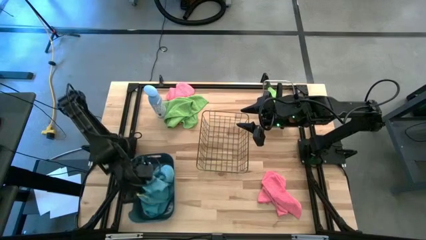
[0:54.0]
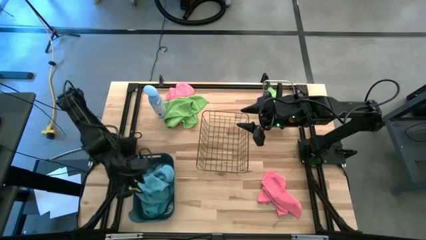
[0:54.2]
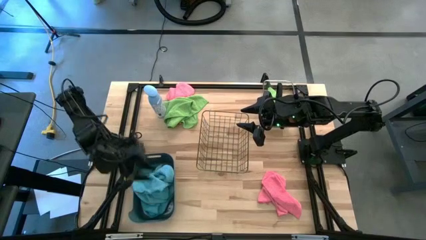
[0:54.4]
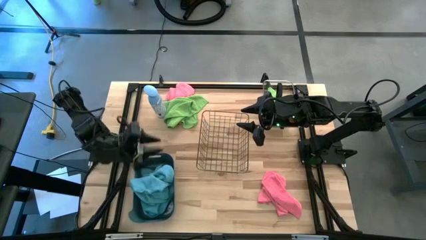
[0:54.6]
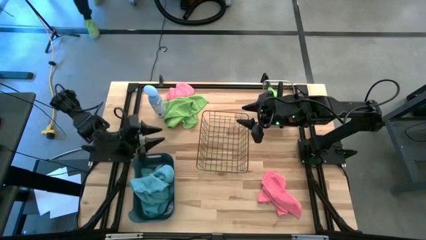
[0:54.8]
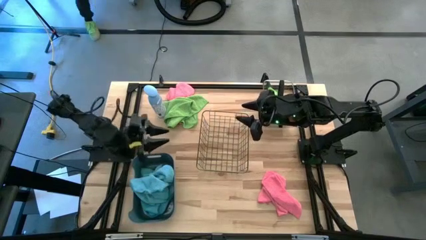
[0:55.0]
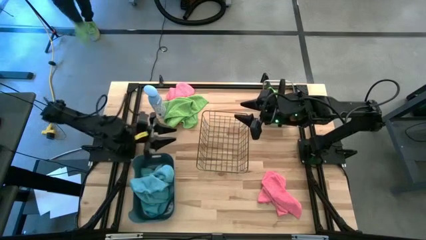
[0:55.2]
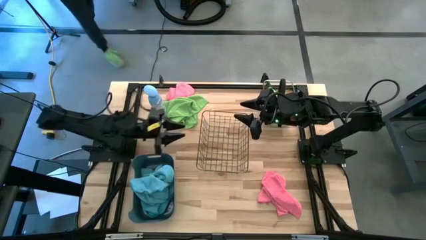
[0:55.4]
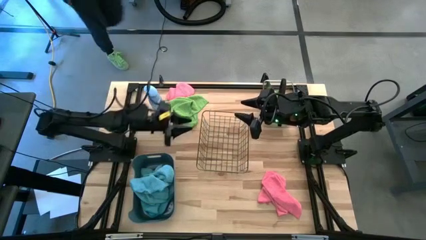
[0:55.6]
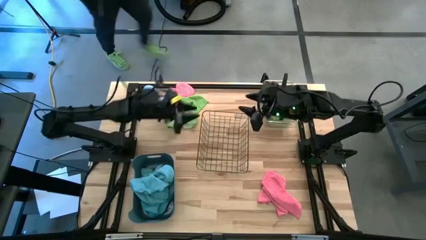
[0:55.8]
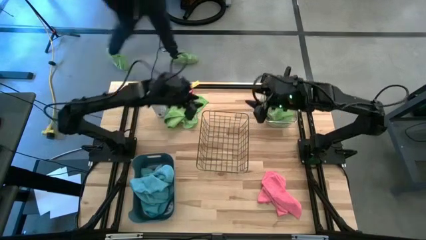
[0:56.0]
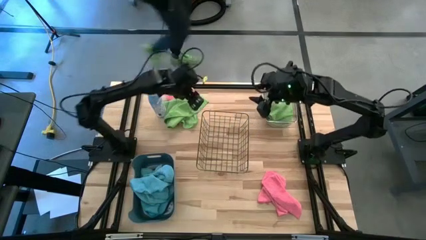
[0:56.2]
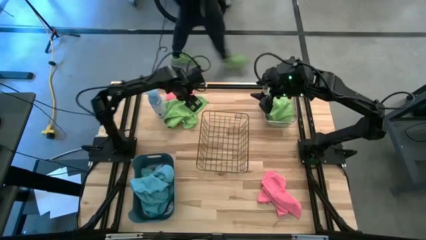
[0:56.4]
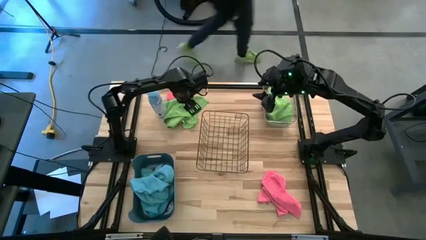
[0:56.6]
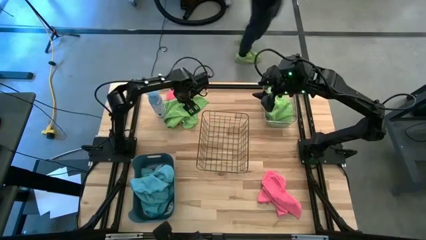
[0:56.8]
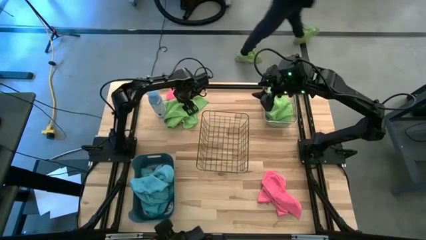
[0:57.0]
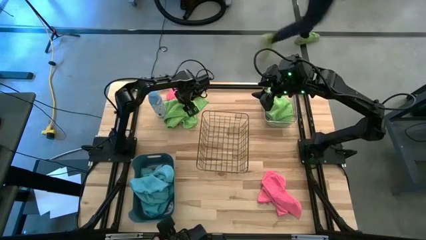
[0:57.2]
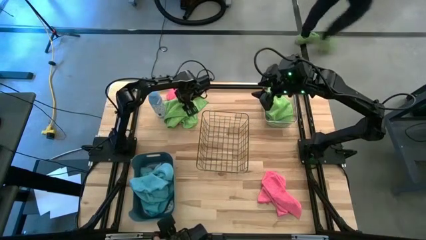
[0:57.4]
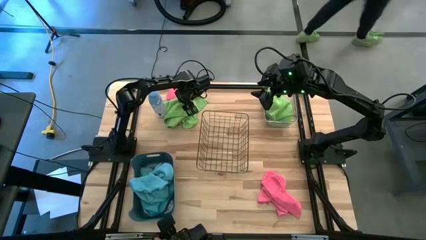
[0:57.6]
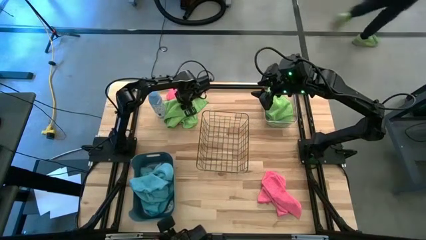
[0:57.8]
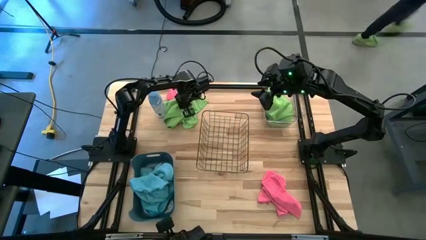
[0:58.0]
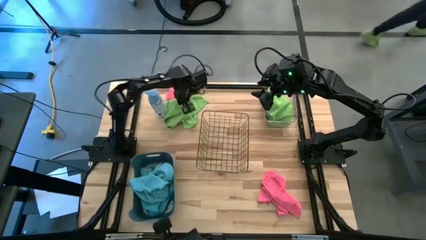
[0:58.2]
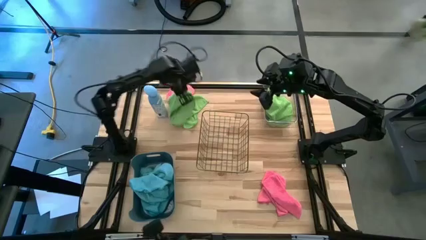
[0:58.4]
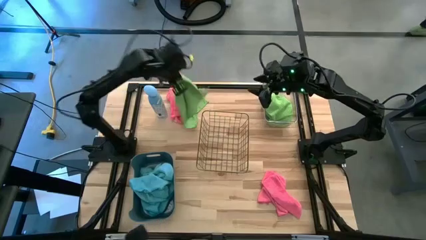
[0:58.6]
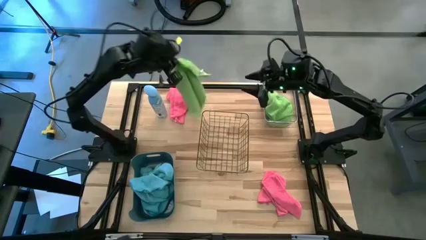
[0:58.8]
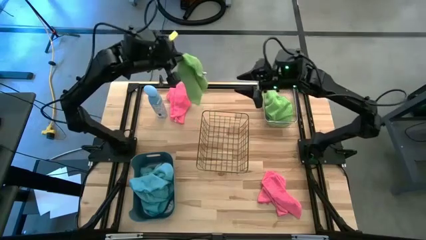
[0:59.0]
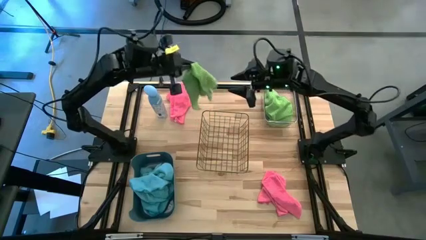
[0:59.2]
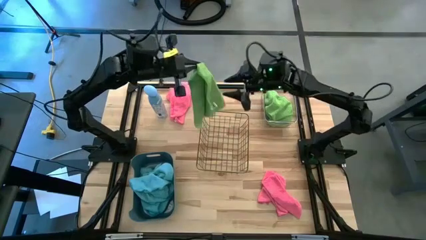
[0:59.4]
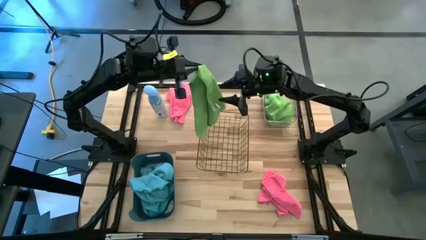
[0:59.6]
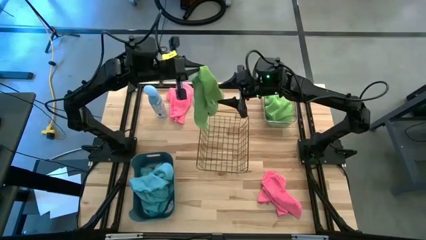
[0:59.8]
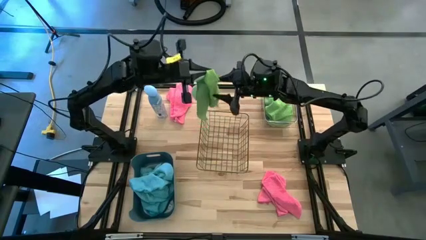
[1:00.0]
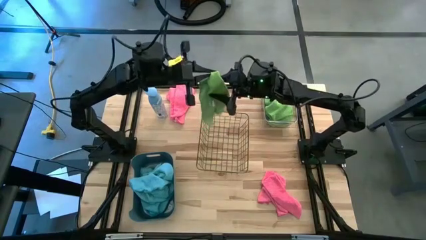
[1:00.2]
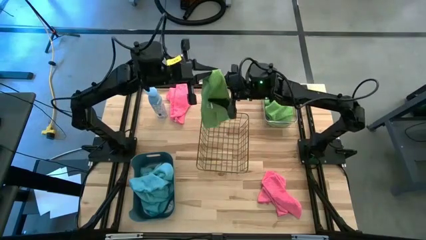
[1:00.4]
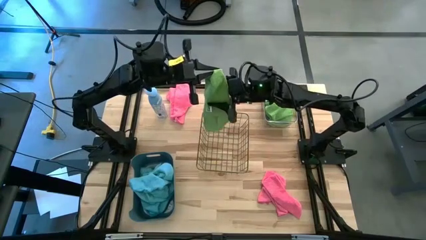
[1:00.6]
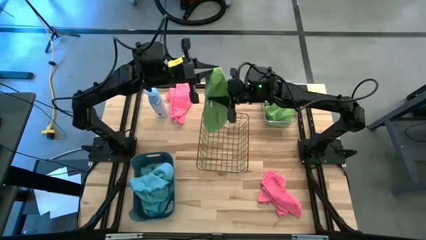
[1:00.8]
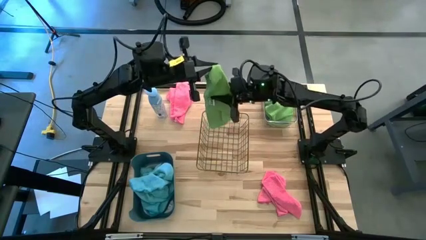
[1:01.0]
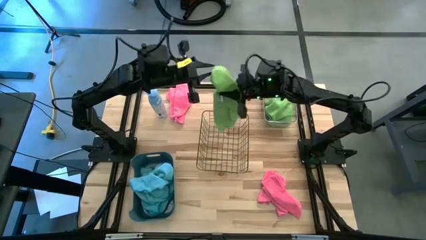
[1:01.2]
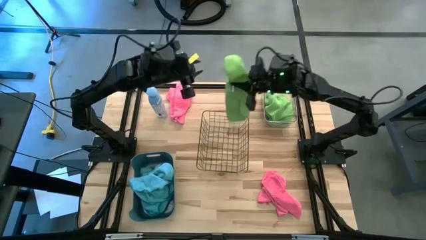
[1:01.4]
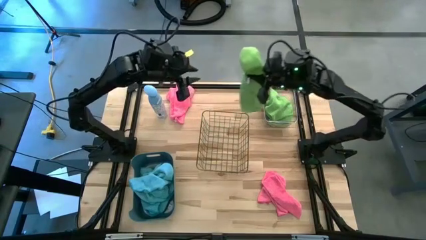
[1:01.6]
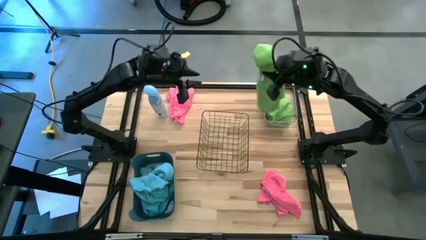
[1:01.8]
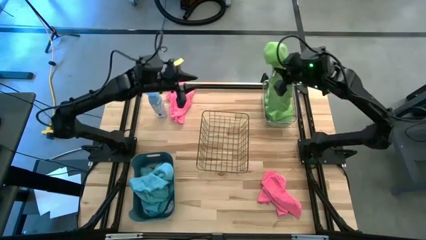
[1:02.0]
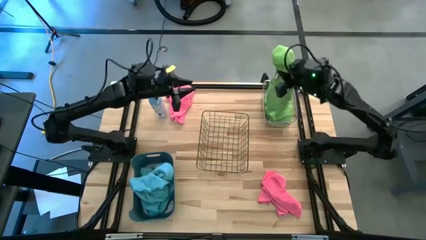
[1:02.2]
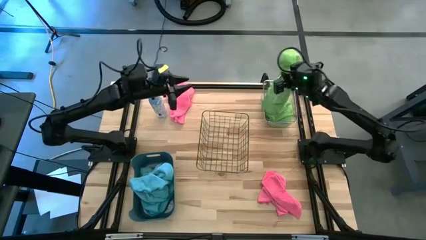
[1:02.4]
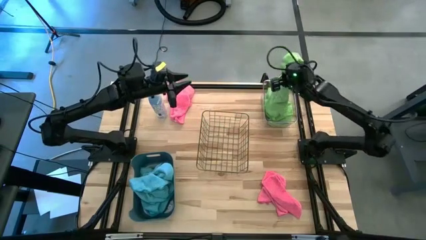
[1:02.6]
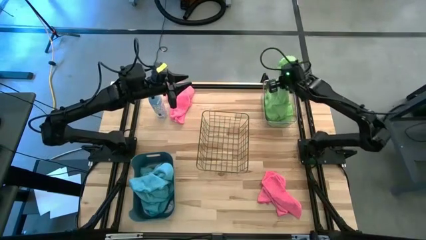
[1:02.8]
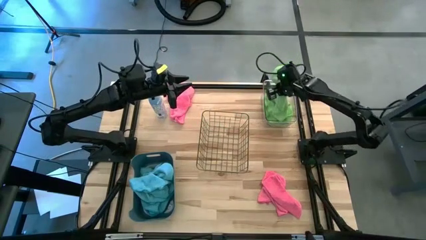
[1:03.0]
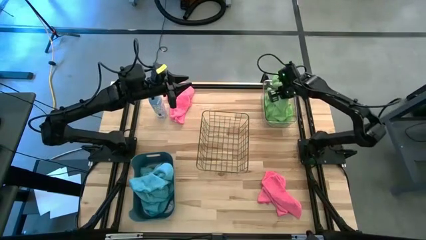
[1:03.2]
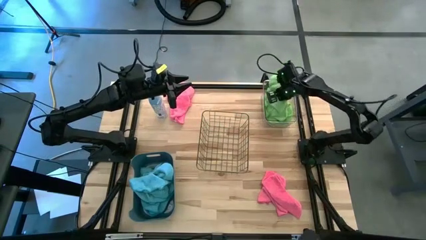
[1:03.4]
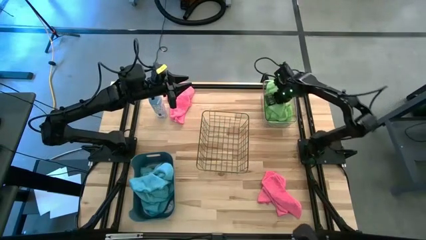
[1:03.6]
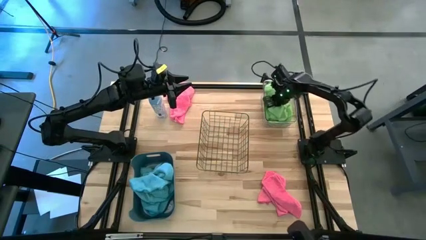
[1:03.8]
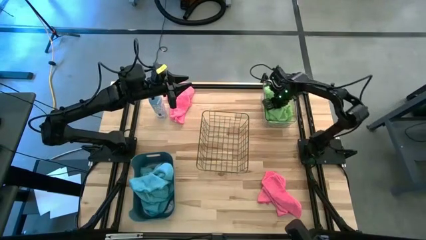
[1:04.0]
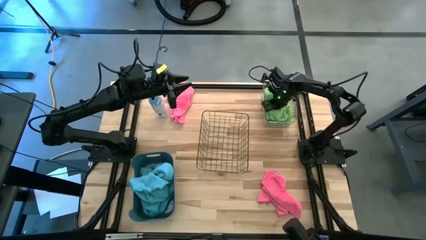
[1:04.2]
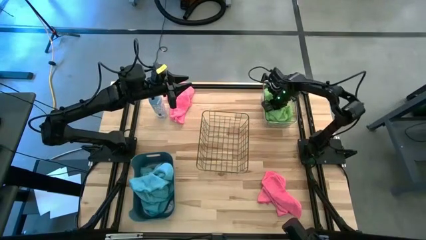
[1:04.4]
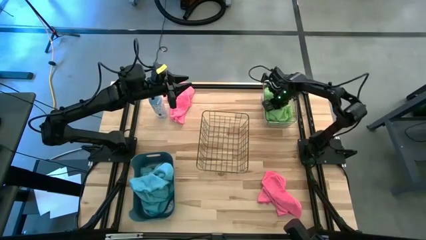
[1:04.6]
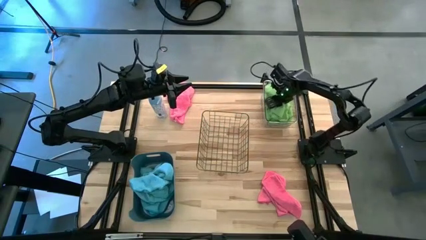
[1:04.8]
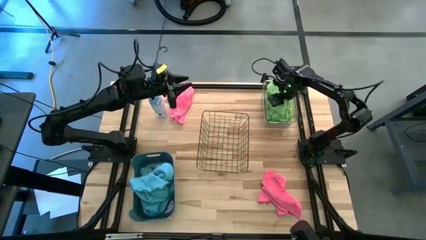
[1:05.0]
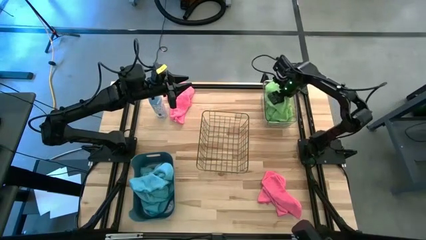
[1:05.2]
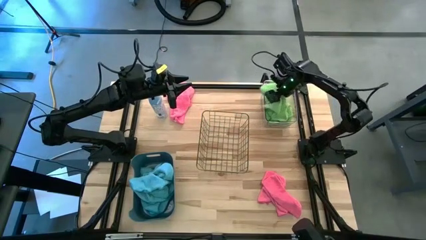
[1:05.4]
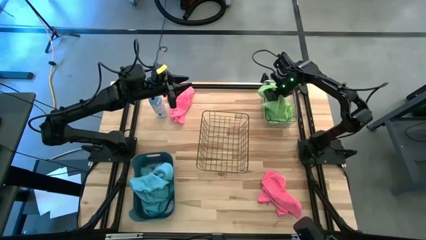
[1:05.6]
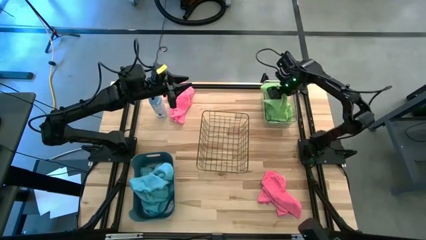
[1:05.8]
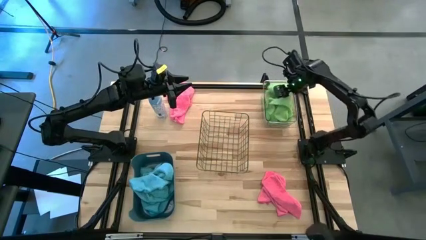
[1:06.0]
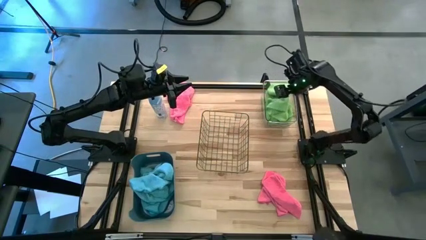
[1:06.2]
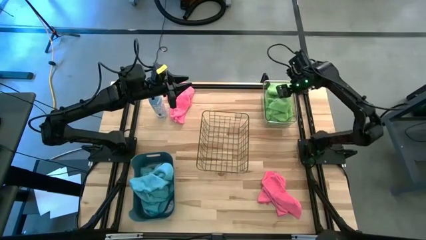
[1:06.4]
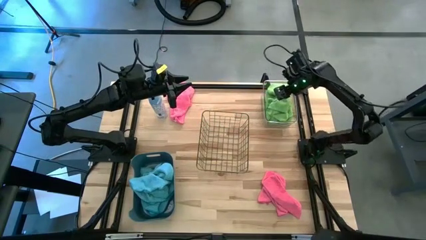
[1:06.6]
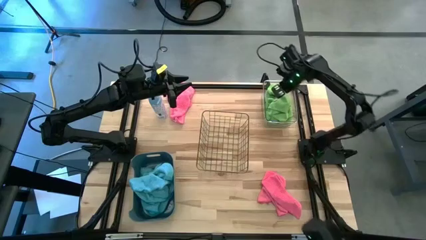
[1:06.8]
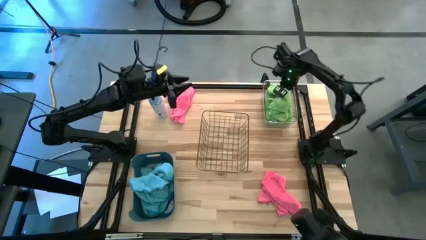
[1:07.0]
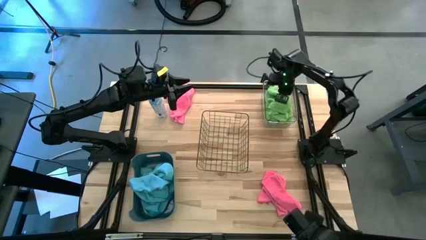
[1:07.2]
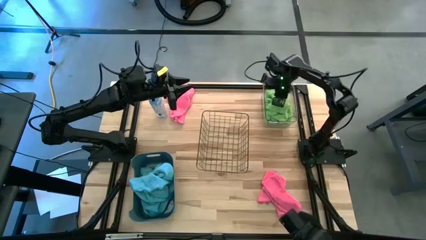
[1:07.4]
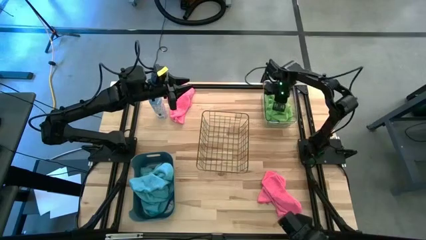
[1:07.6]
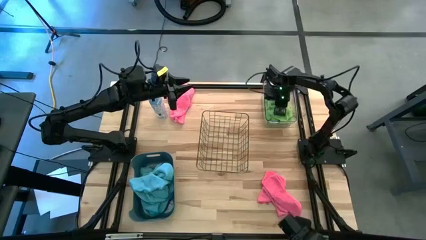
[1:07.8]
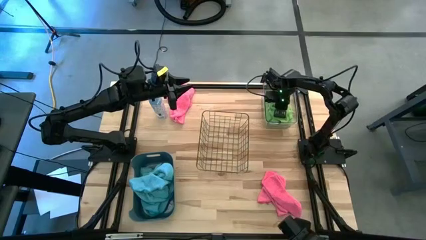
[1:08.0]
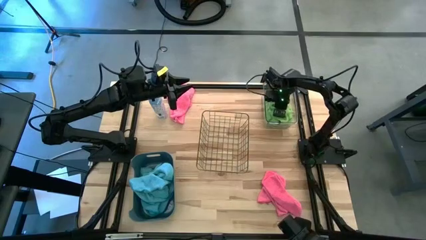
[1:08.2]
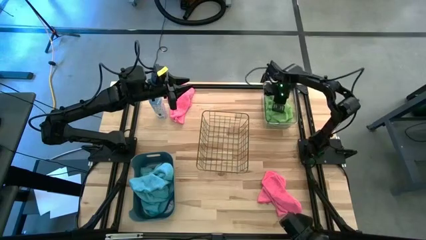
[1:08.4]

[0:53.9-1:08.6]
Task: Sort microfiber towel by color & place in baskets
Put the green microfiber cloth into the transparent bin

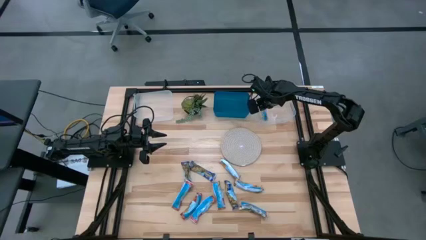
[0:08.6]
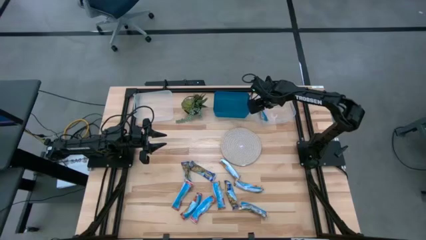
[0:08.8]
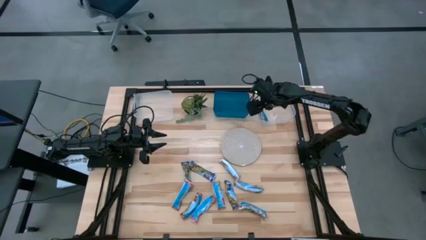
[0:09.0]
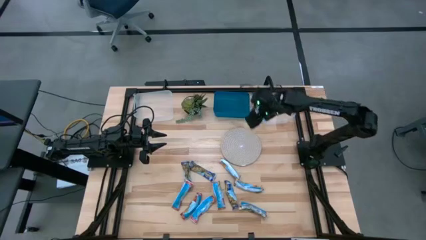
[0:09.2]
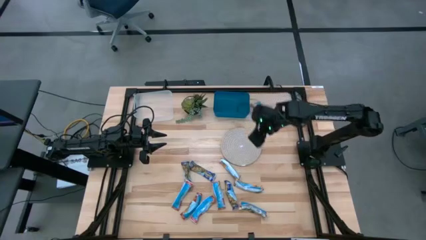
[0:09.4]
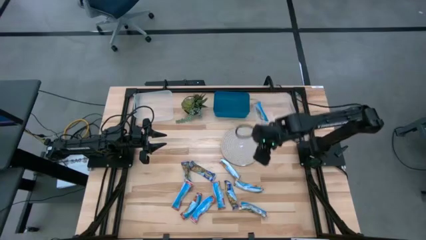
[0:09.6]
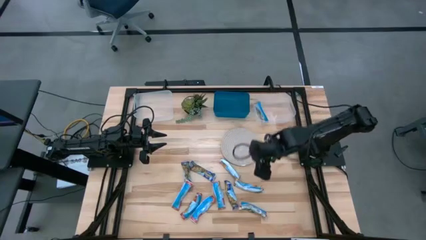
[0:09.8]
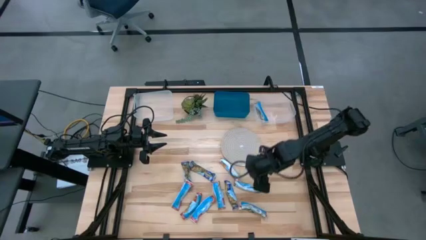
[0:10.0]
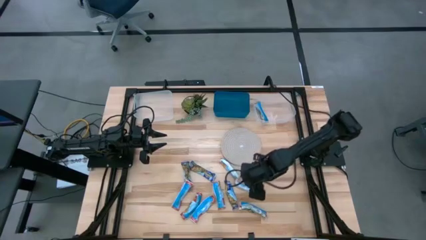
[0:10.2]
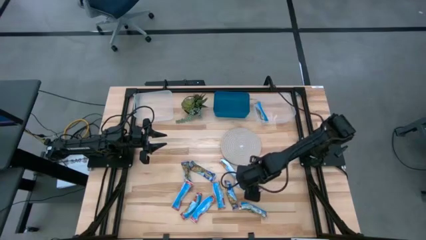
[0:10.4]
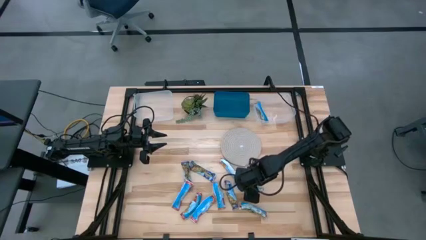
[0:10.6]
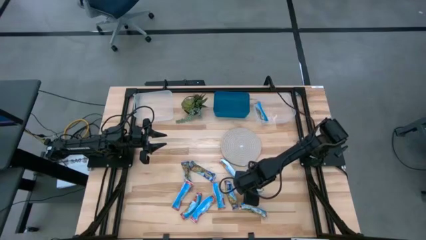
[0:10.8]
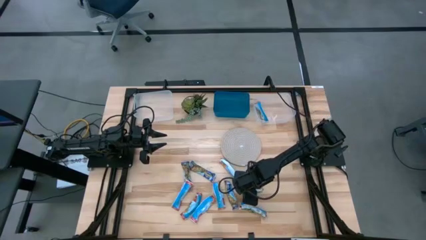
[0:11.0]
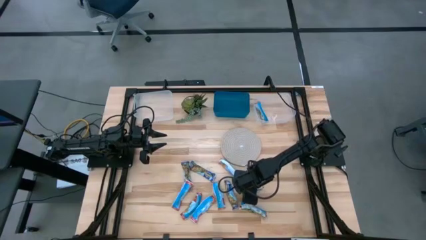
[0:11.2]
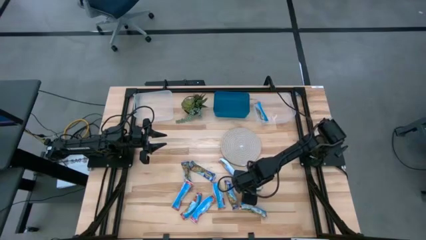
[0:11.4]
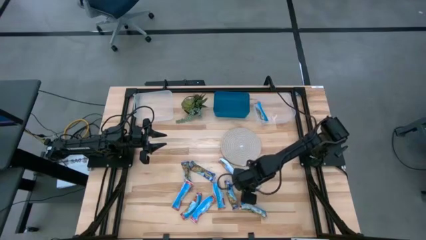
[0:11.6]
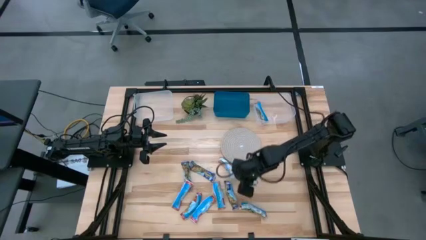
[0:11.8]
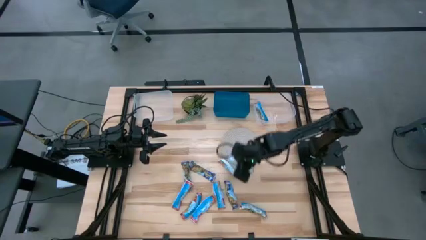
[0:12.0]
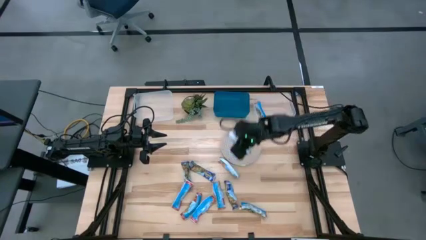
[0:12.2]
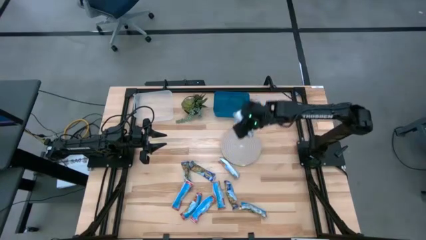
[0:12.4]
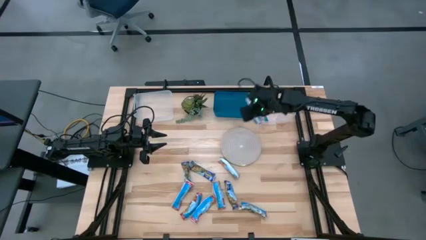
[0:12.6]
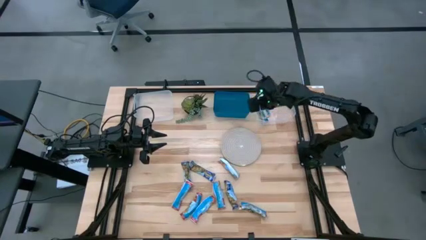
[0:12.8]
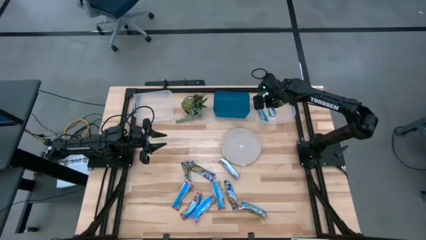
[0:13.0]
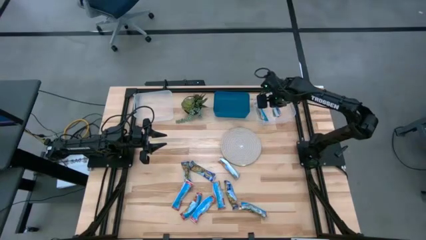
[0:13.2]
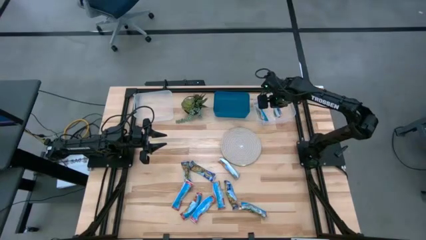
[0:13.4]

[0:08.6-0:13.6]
Task: Pick and place Granola Bars by type
Put the yellow granola bar into the right transparent bin
